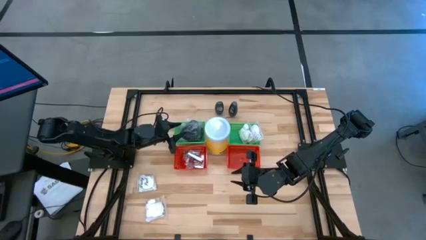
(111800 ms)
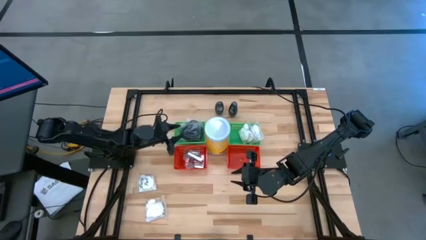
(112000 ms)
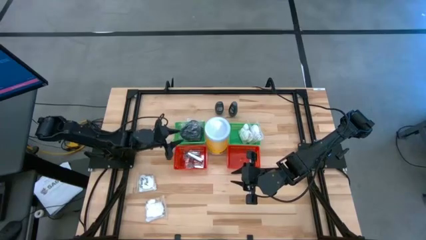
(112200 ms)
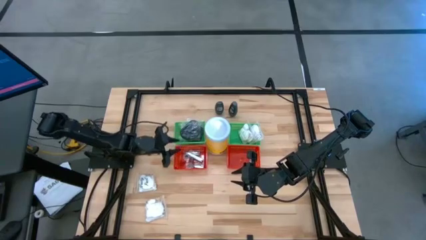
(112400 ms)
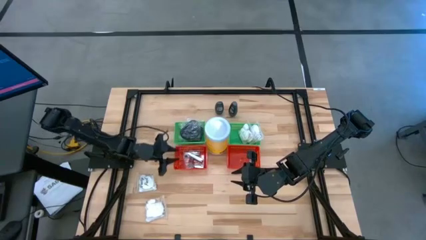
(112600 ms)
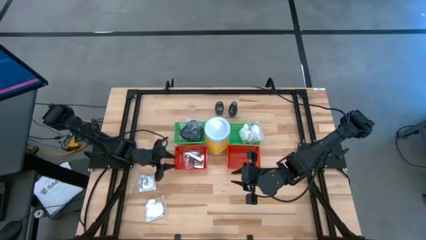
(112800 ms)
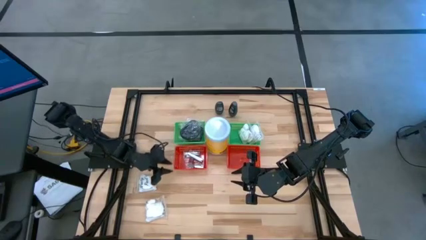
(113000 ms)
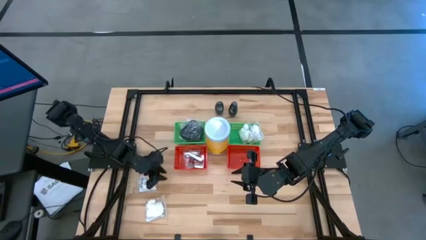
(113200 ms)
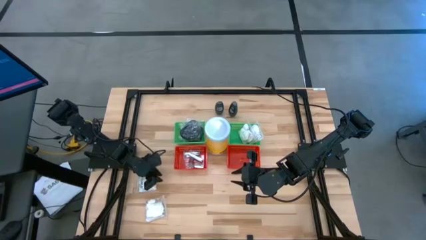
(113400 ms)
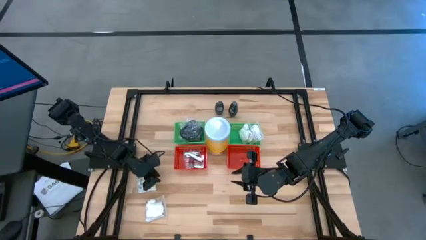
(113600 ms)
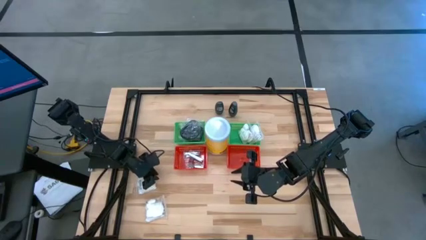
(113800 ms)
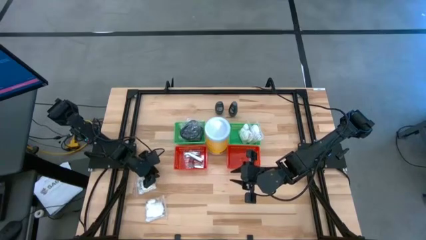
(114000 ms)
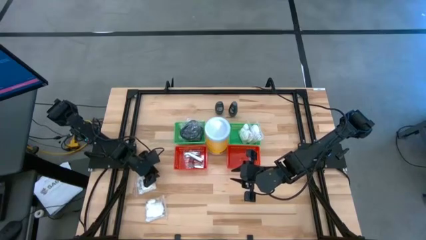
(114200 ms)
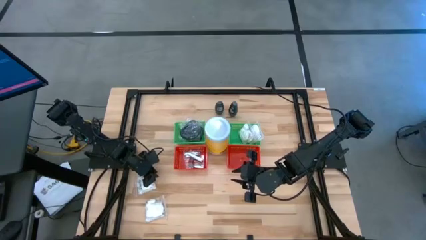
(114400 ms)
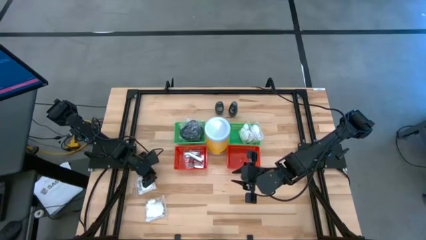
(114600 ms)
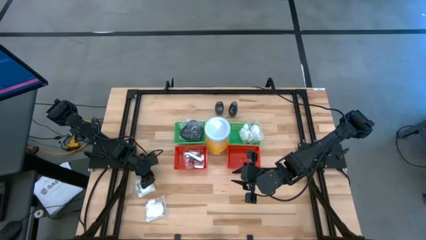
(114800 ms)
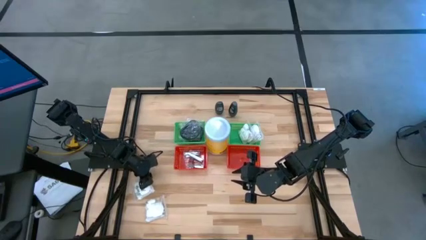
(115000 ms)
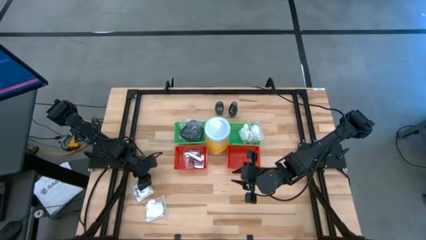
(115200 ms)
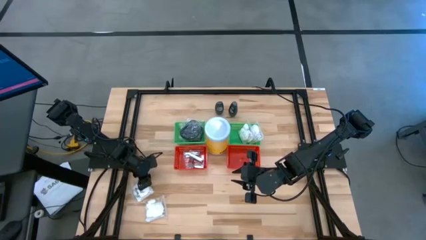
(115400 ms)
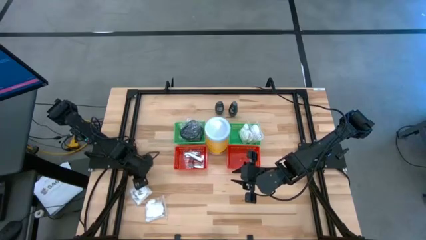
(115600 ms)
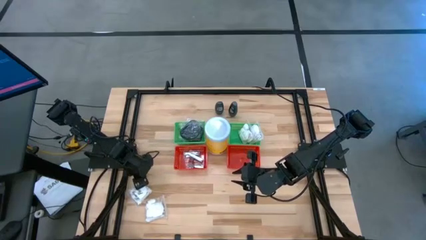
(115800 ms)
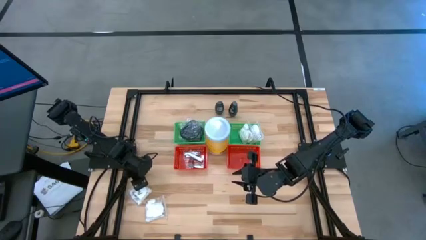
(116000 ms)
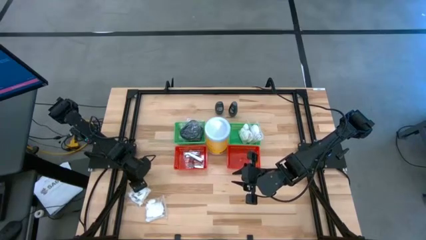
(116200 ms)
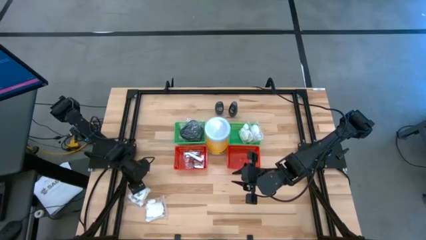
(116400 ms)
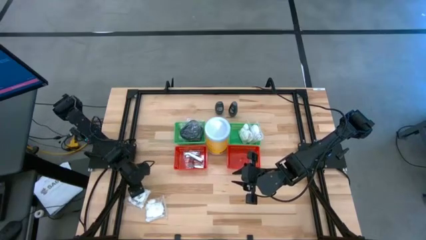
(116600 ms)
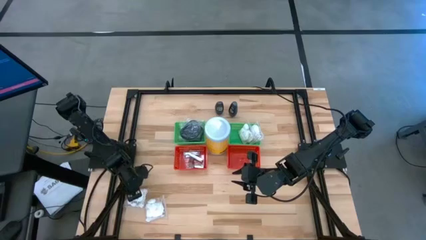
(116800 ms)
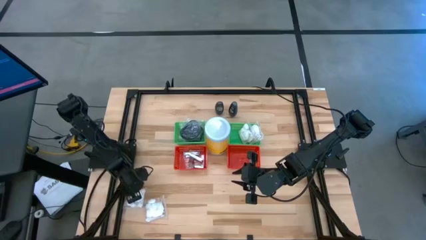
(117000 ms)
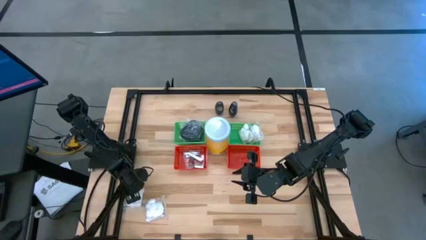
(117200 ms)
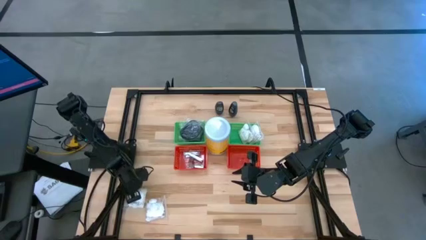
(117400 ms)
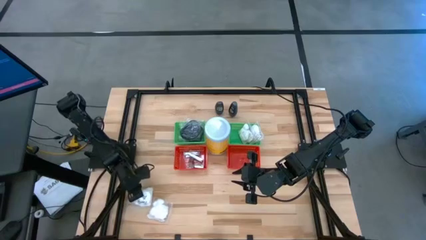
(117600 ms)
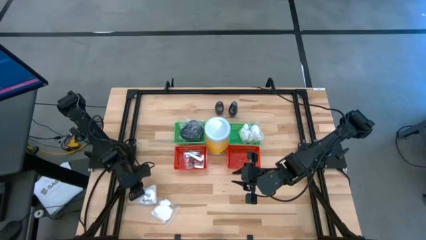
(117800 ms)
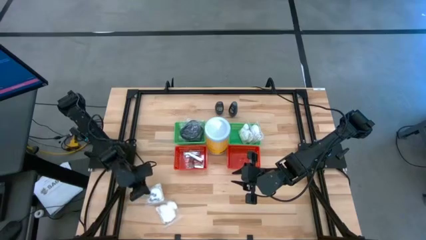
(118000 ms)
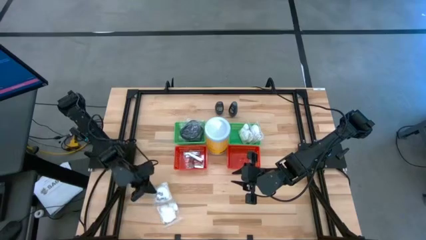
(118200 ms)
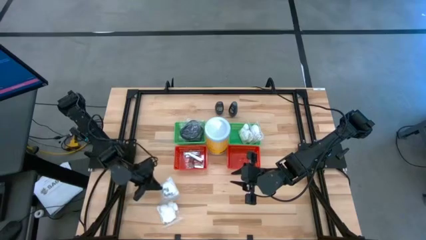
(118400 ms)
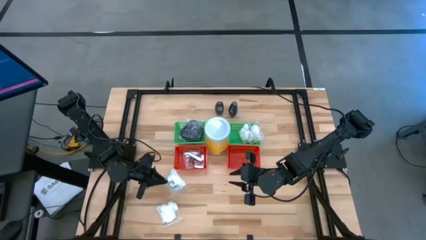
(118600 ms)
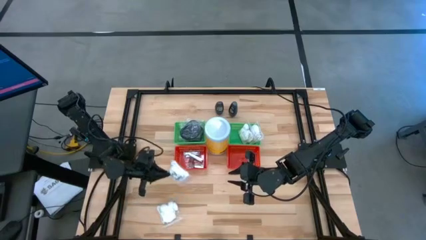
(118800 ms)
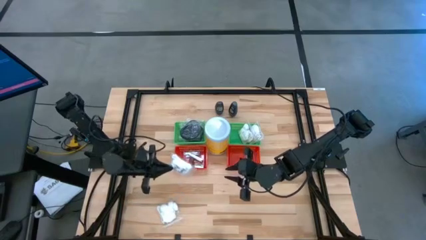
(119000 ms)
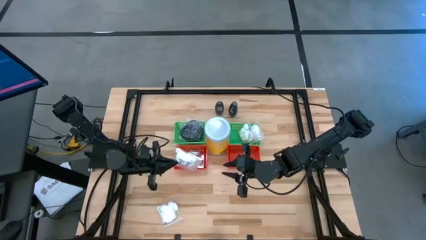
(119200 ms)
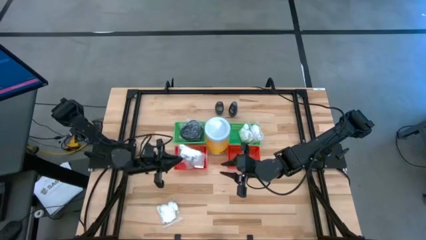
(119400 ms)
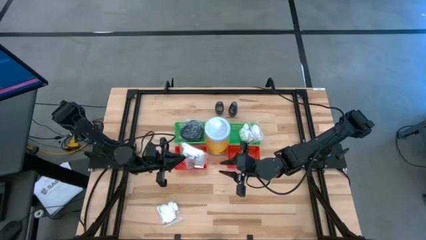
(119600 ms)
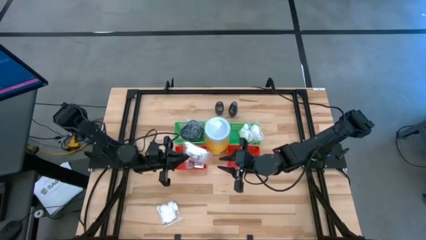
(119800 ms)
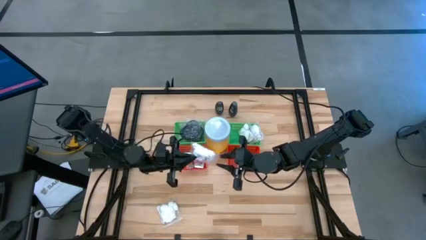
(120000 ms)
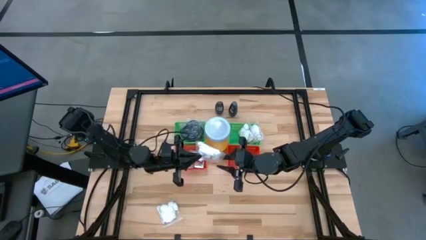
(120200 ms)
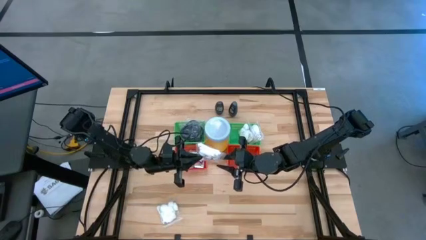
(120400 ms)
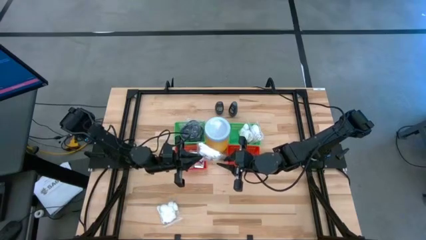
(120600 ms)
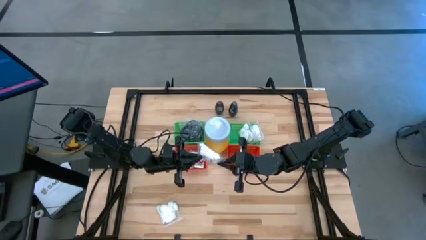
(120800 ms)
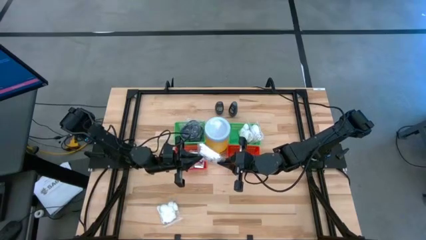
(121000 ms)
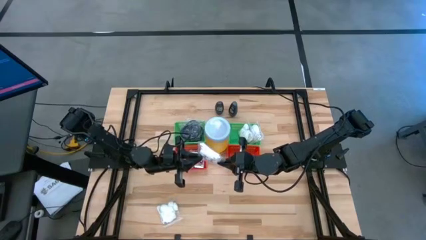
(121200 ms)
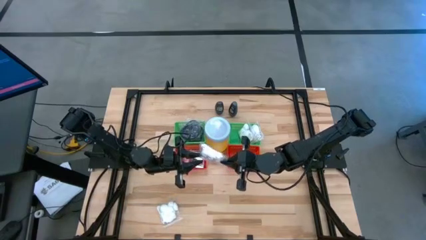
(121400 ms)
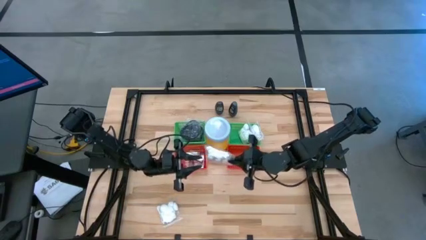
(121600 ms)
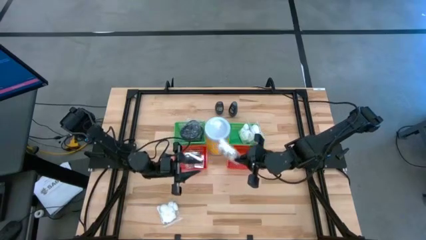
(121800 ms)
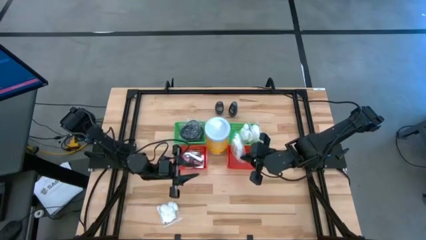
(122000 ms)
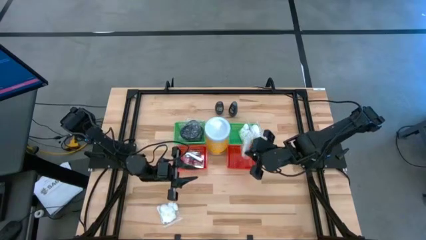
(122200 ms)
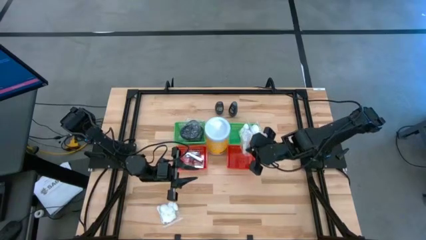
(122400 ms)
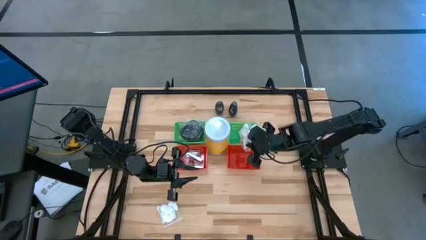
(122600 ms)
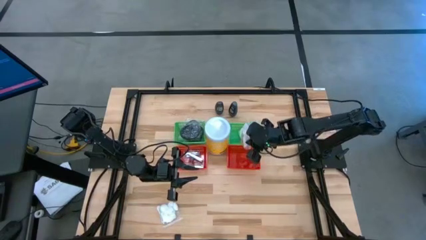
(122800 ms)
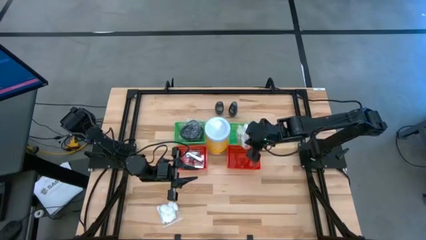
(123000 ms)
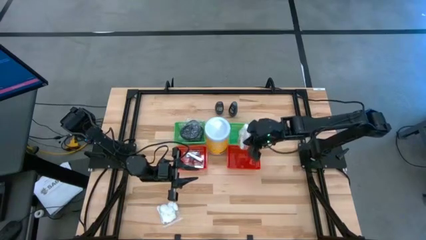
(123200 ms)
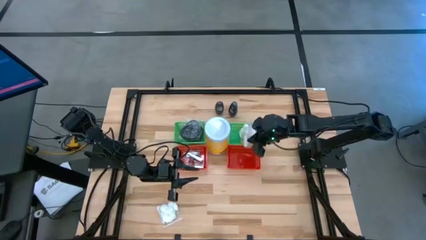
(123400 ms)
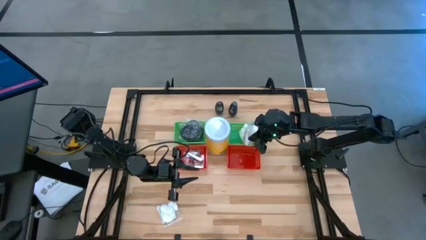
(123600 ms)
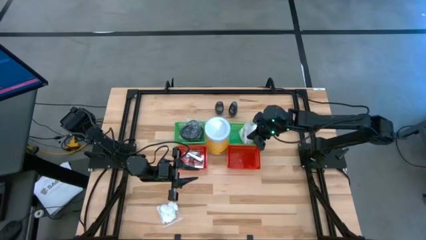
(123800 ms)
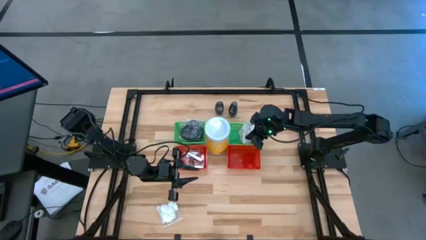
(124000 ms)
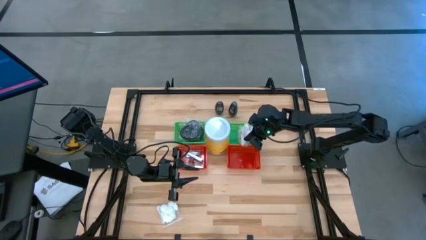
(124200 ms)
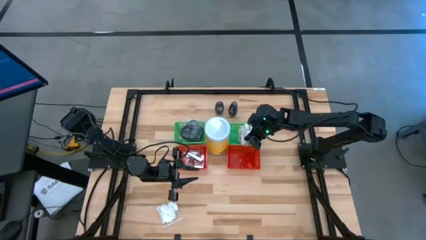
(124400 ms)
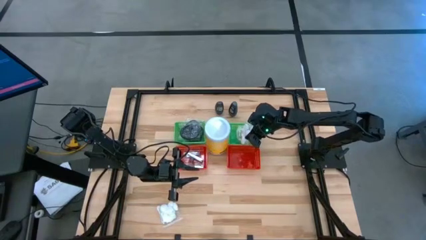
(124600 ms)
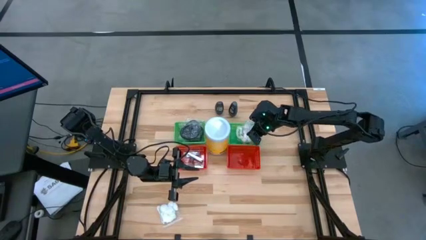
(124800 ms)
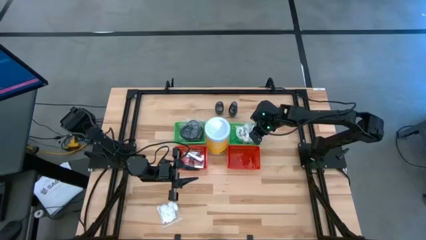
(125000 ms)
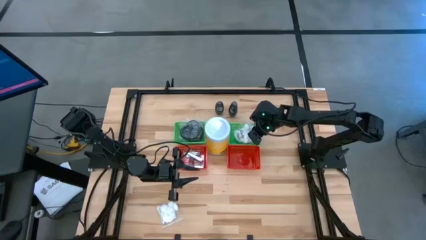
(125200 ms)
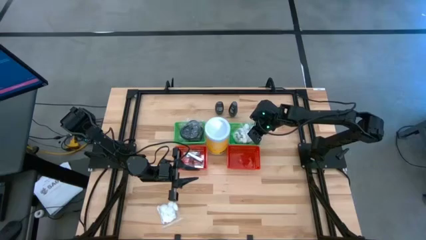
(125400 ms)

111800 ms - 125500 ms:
Task: Pick & Place Travel size toiletries
Put the top vanity pack into the right green basket

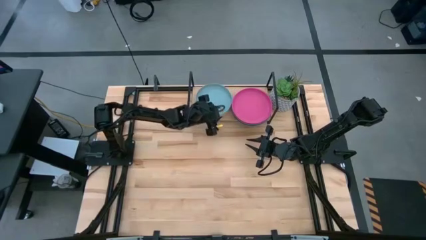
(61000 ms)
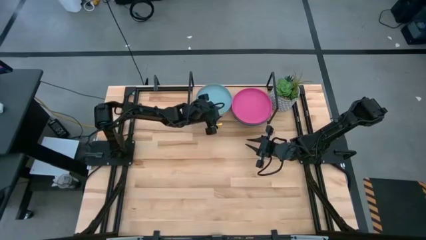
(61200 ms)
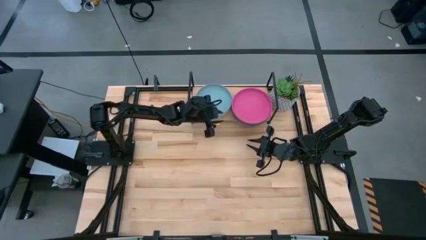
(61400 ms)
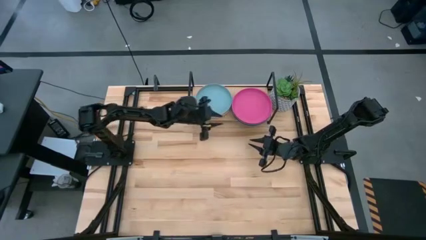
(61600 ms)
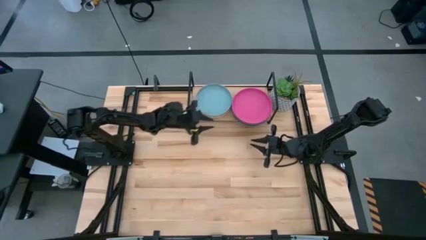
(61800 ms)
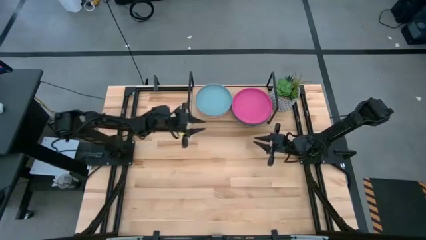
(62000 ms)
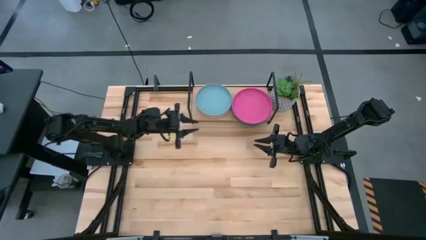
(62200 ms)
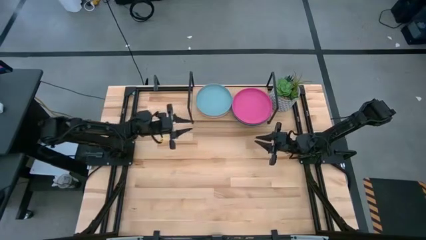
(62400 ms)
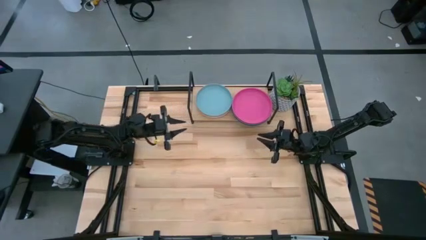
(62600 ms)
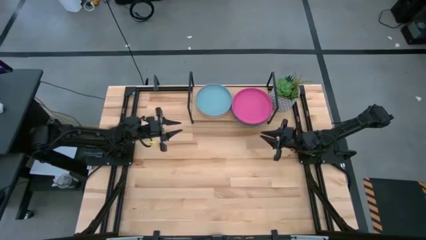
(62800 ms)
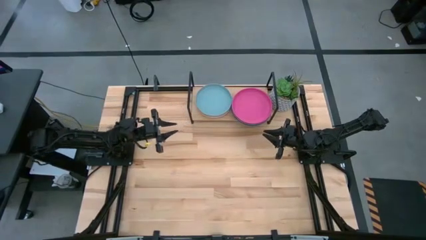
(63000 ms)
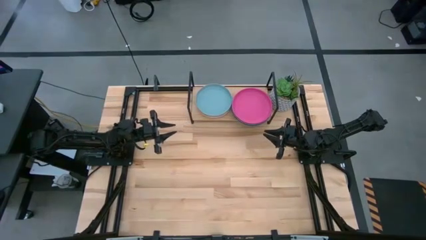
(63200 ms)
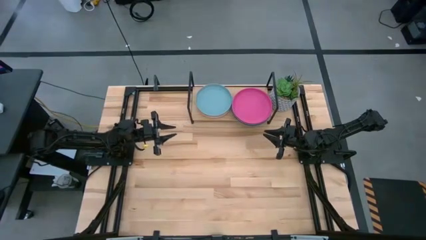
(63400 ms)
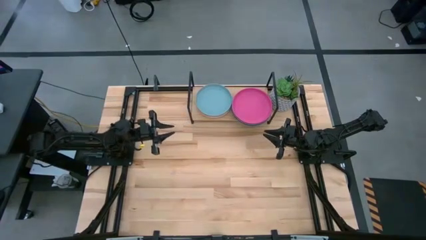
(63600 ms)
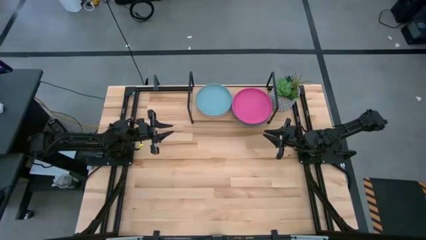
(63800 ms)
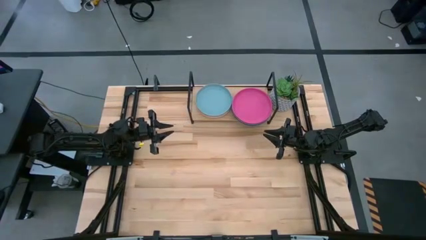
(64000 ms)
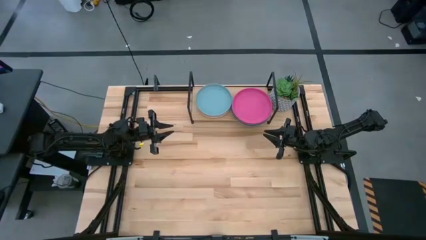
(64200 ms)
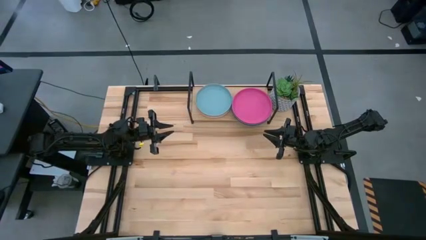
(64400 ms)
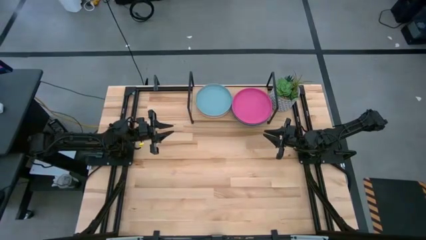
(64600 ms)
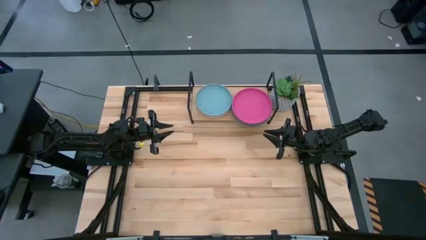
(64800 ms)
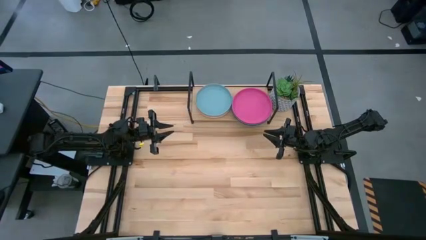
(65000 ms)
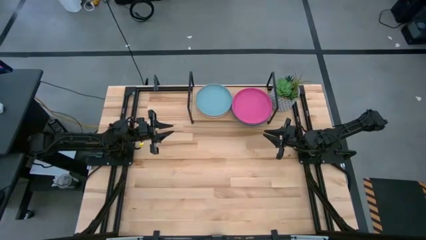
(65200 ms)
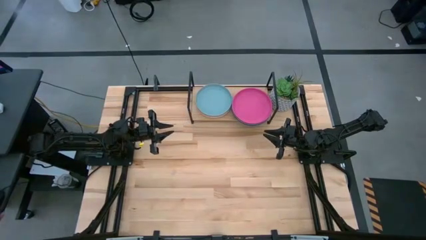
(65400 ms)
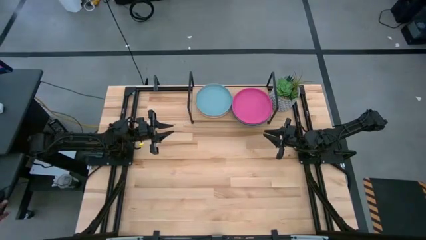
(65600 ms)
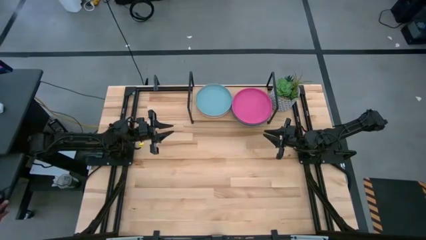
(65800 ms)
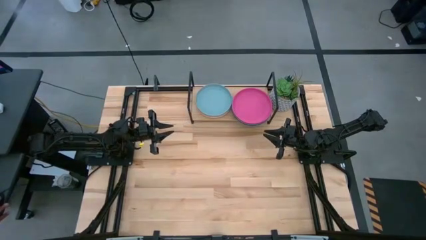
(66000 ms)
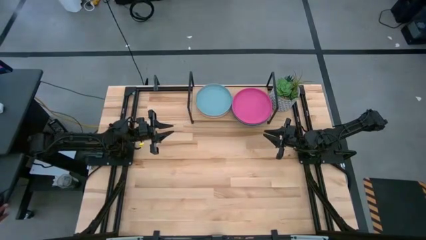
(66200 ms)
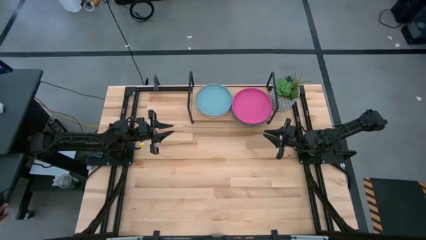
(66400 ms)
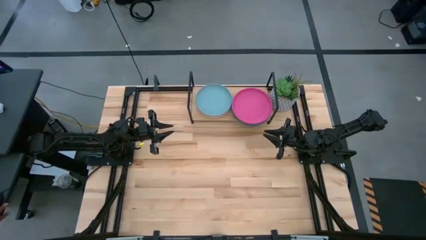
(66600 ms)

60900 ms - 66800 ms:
Task: Place and stack plates onto a shelf
Return to Home Position
